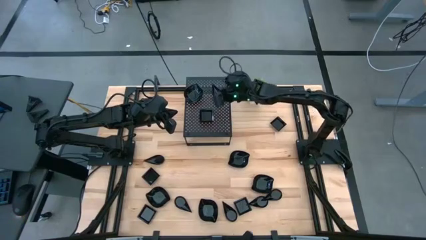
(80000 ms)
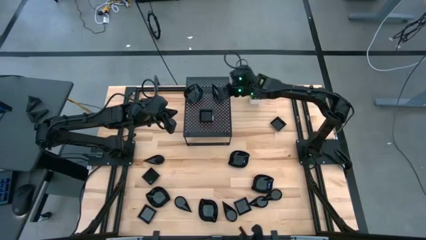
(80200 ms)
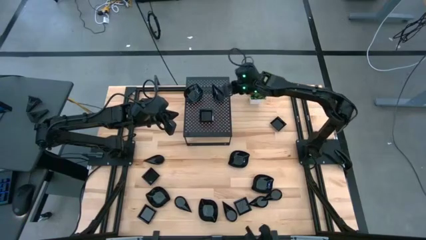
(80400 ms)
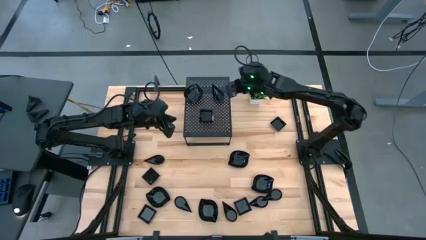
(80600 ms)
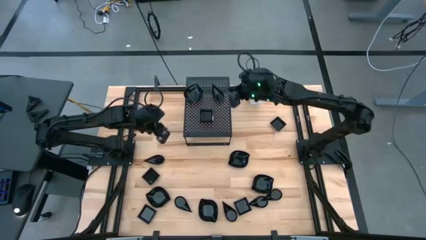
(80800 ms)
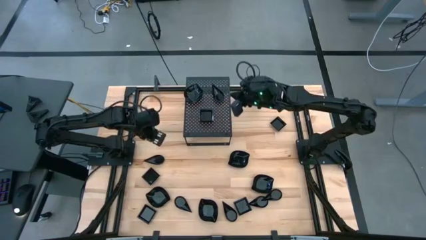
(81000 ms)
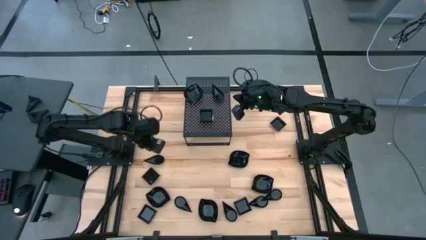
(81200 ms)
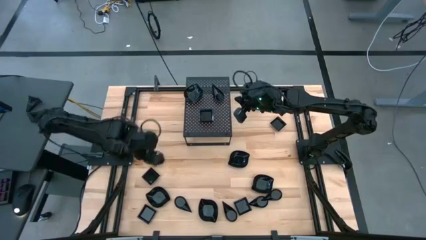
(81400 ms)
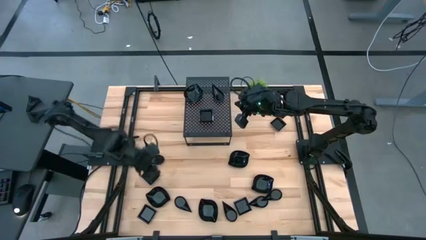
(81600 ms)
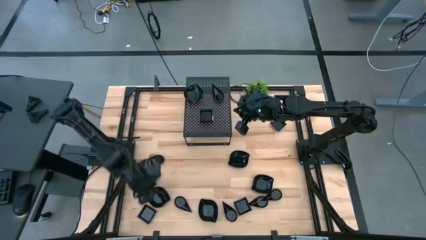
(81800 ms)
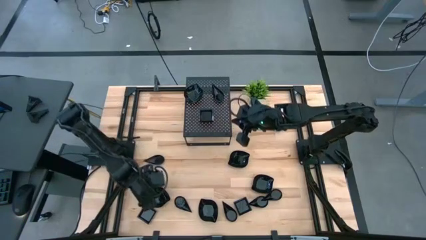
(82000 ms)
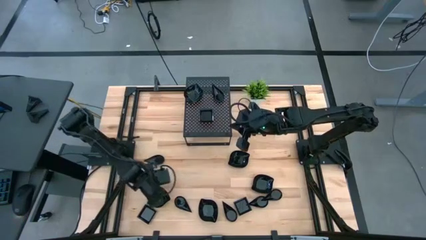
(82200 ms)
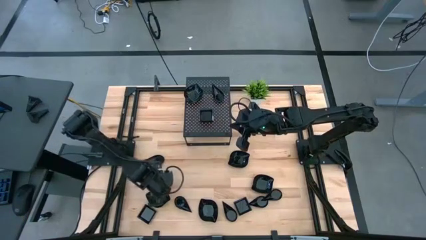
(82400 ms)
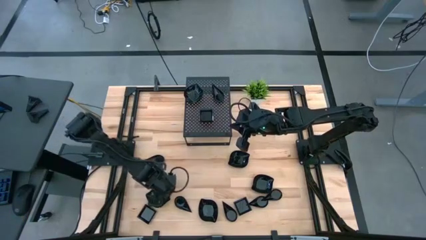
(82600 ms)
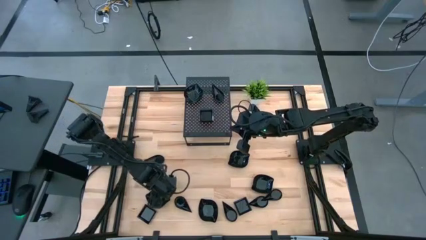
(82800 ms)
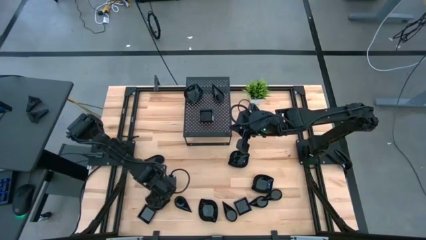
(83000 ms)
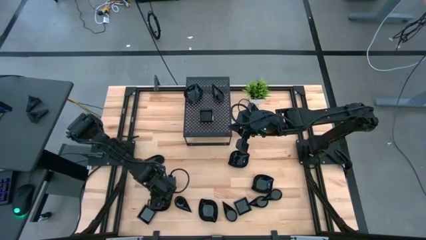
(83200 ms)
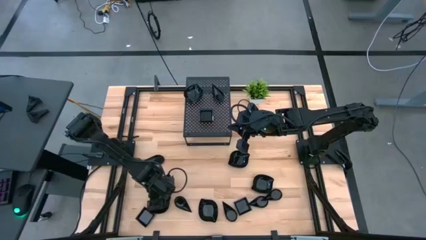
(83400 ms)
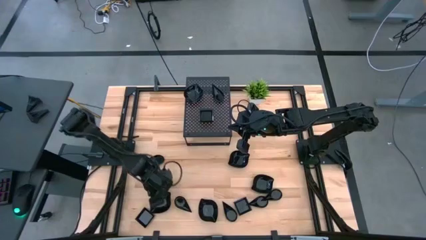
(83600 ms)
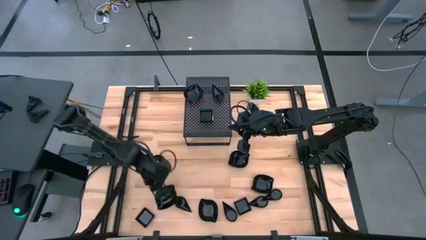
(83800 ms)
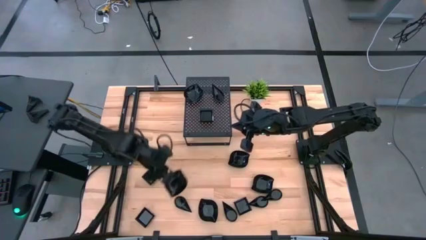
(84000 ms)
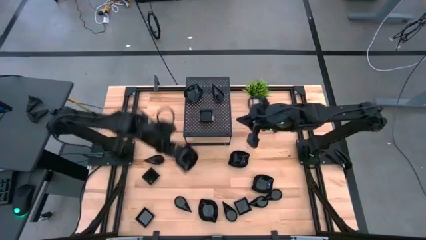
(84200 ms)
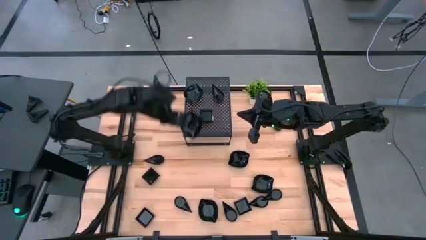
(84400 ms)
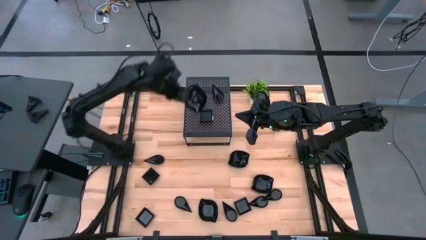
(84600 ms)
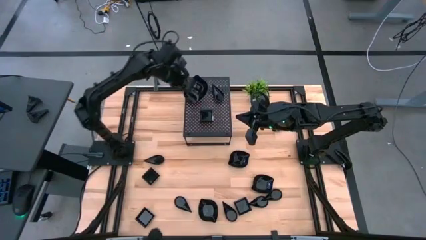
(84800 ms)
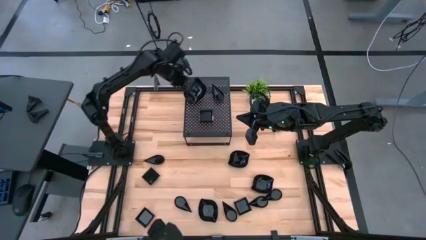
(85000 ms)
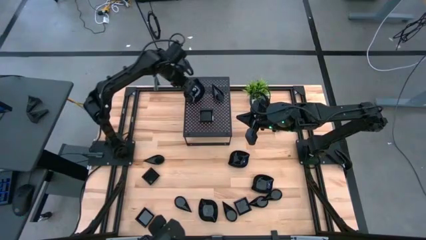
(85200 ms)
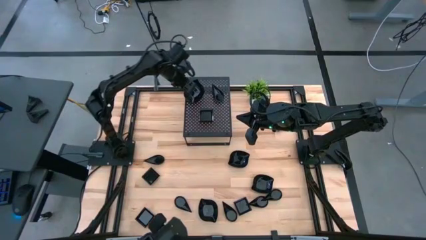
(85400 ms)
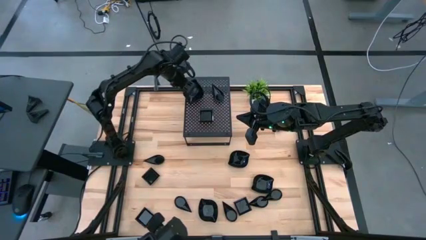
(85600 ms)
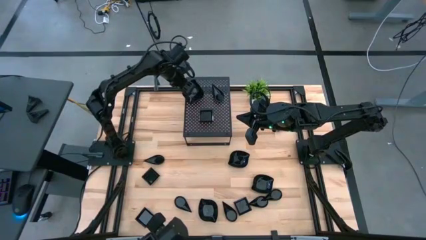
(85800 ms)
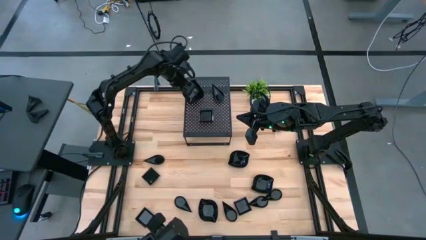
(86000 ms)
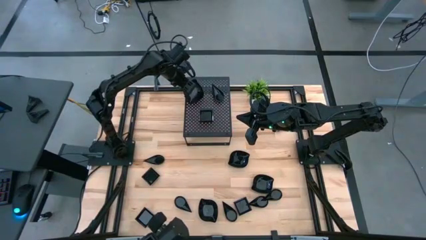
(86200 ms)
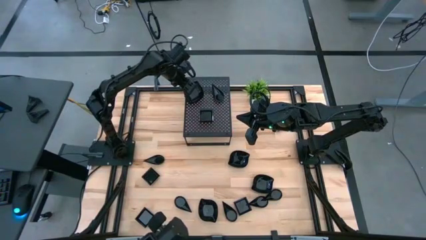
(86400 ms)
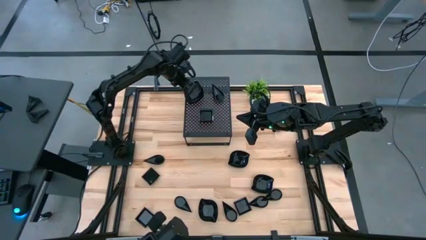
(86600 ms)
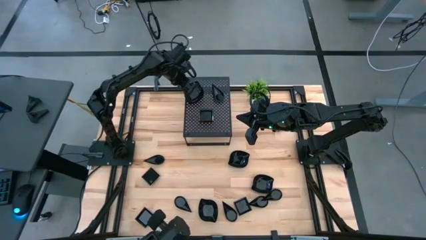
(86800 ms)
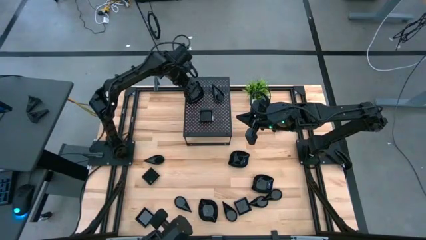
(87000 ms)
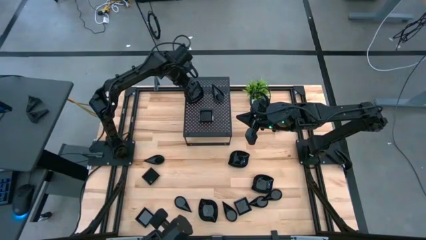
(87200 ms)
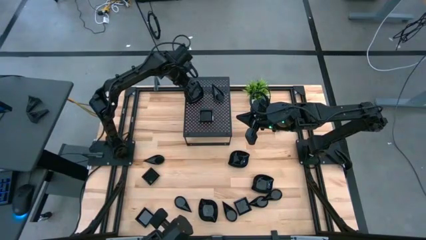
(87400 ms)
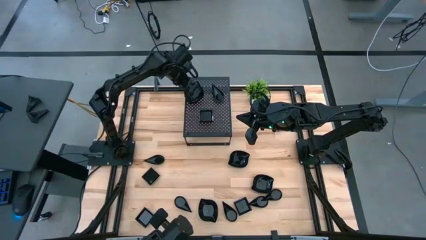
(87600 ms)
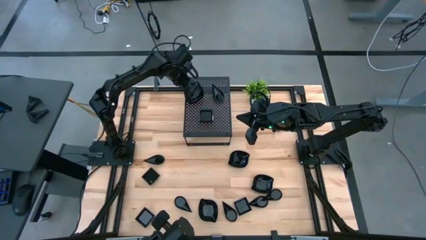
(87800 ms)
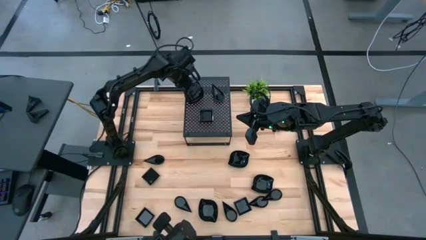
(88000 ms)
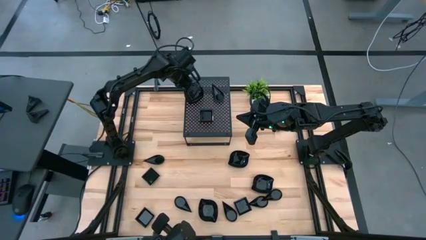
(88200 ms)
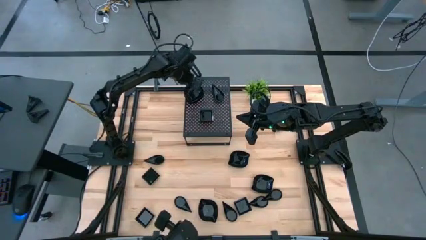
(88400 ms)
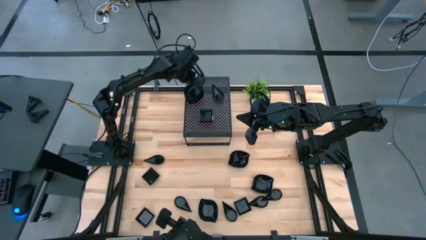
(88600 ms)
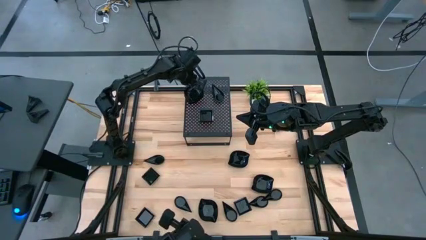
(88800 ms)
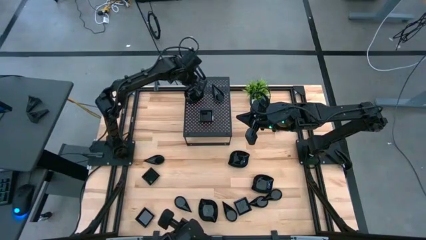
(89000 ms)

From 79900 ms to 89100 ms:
Task: Pick & Place Mini shaped plates
Stack the leaf shaped plate on top of the leaf shaped plate on the shelf

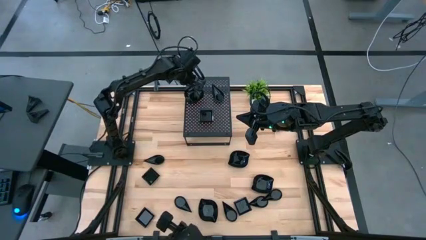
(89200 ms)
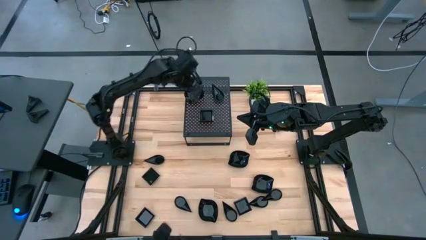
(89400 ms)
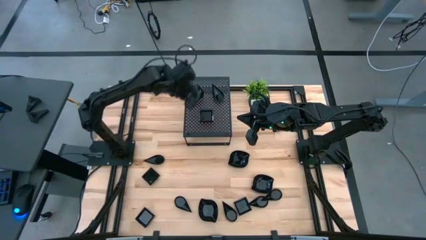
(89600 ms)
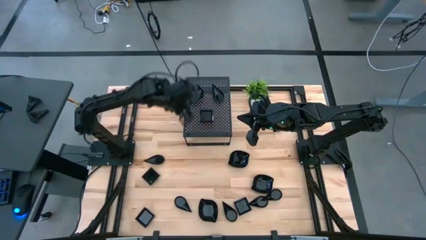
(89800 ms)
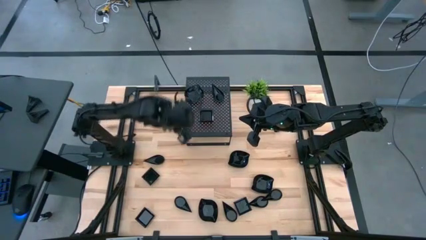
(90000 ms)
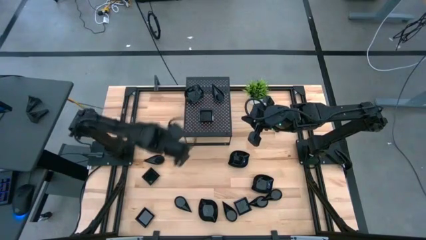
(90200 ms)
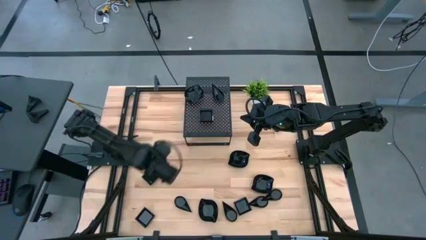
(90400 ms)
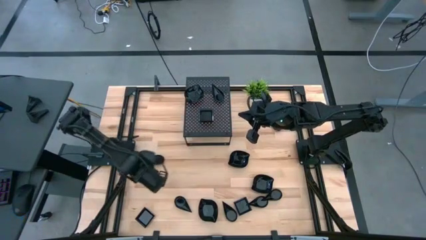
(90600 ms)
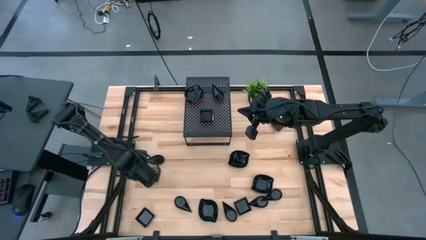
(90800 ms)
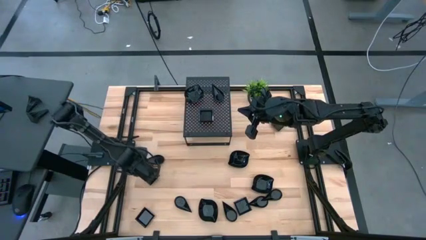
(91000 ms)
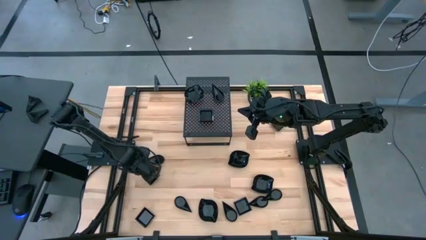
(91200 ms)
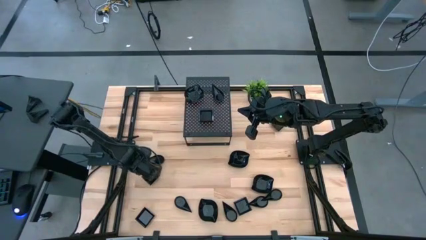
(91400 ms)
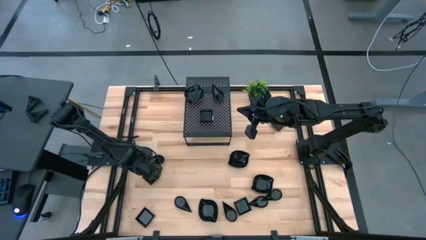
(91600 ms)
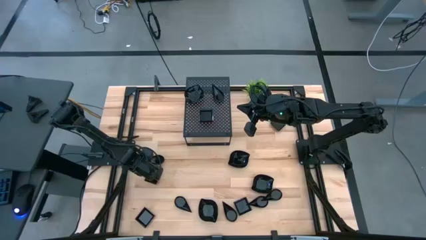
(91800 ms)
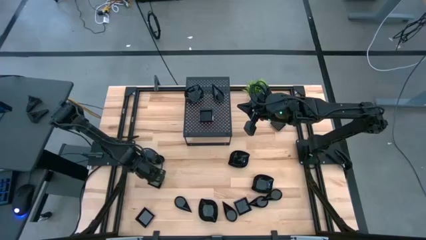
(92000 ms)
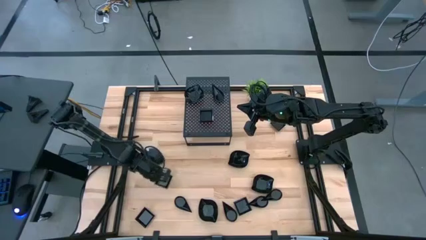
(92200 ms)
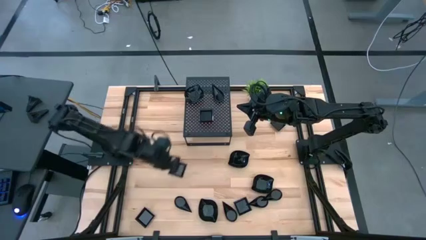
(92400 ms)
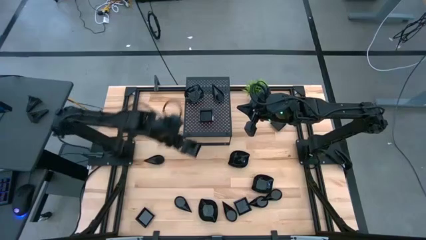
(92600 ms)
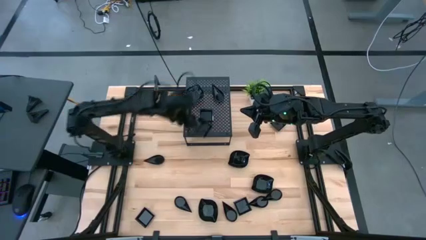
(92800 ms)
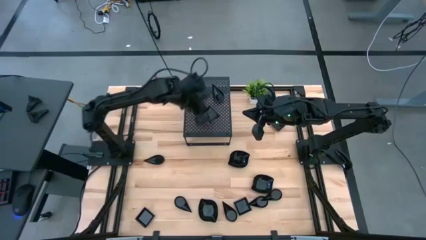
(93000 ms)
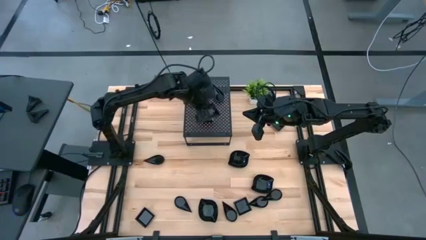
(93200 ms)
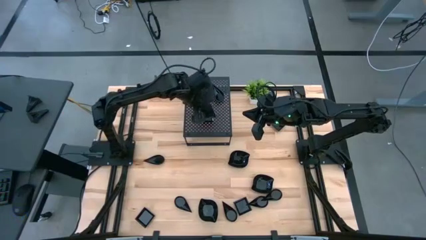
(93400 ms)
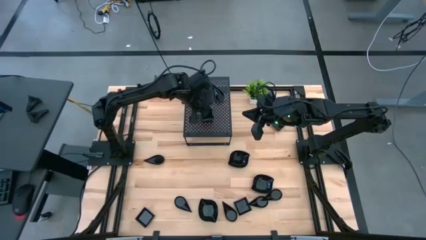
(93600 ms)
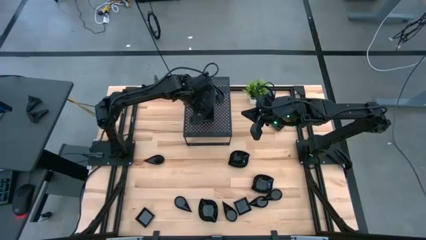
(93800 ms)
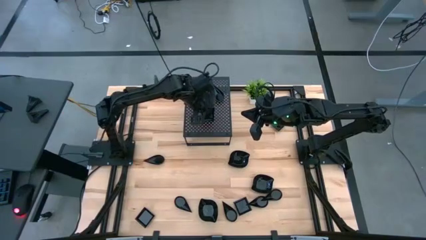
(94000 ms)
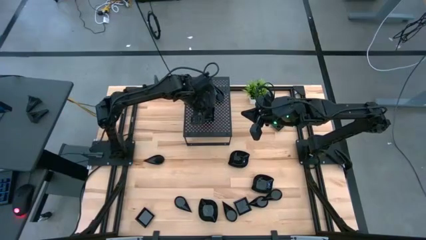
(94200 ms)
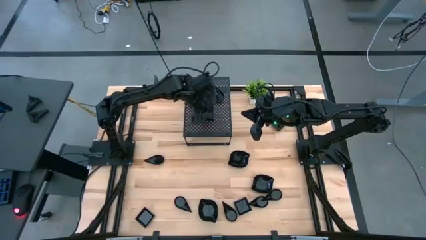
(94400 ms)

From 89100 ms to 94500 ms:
Stack the square plate on top of the square plates on the shelf

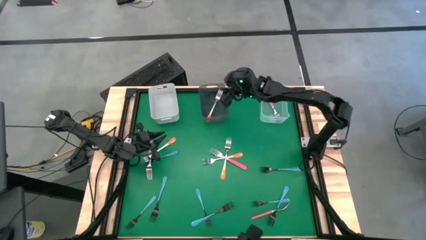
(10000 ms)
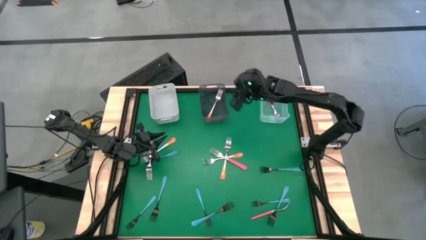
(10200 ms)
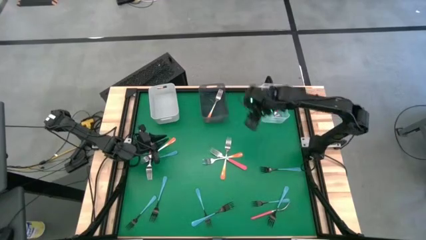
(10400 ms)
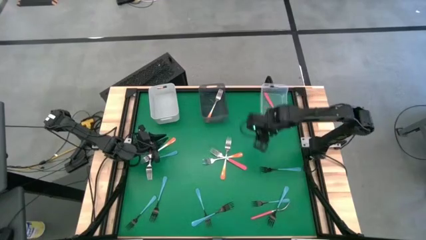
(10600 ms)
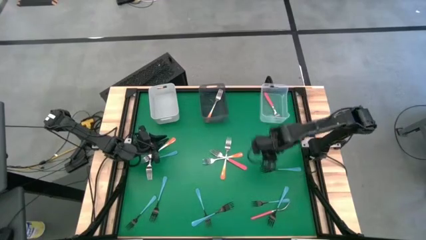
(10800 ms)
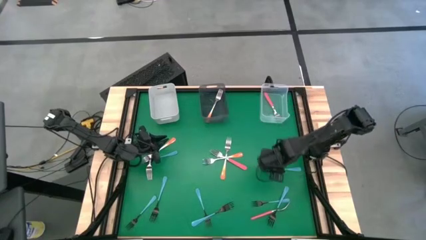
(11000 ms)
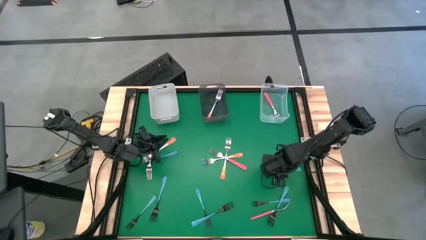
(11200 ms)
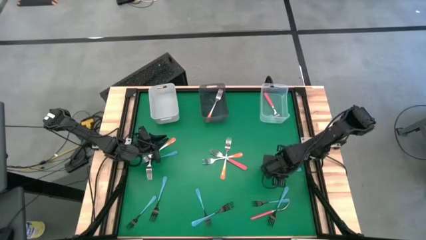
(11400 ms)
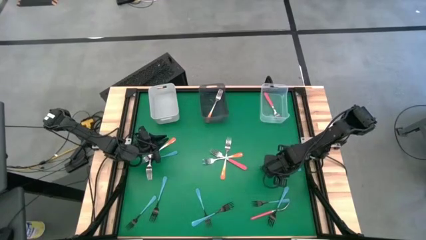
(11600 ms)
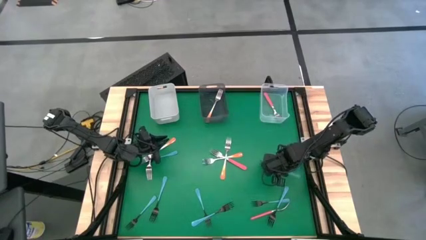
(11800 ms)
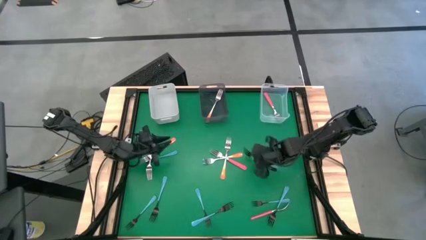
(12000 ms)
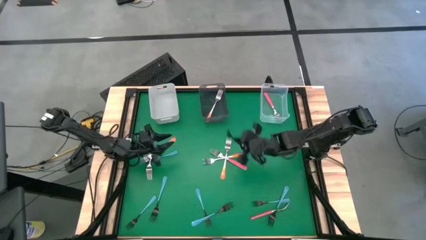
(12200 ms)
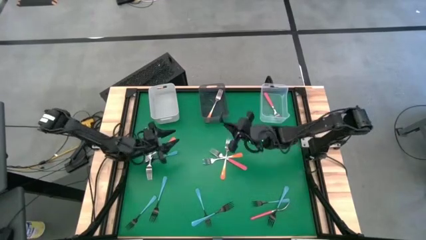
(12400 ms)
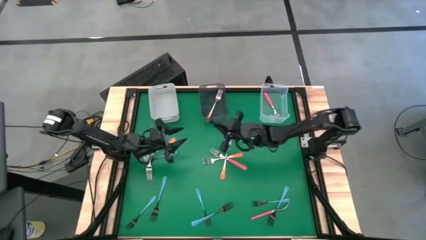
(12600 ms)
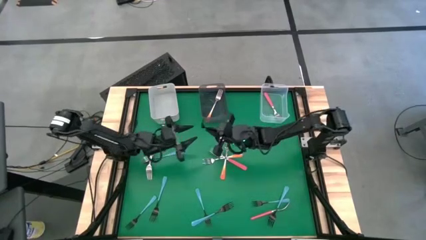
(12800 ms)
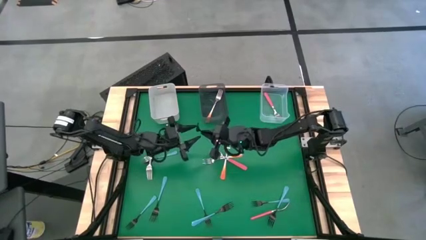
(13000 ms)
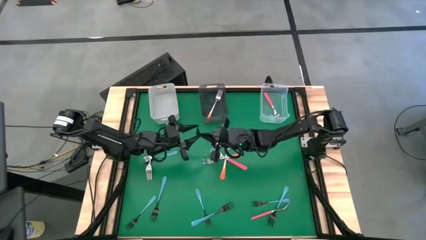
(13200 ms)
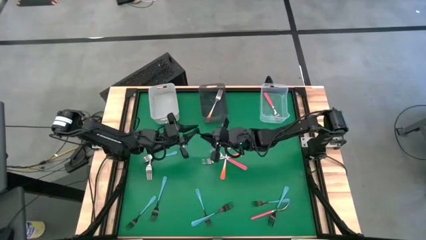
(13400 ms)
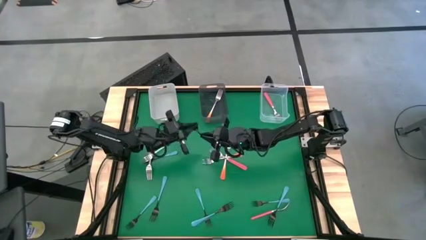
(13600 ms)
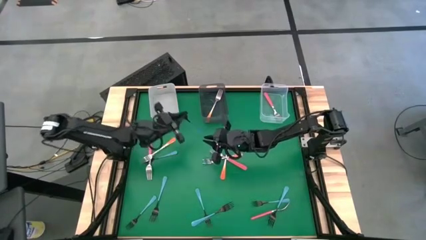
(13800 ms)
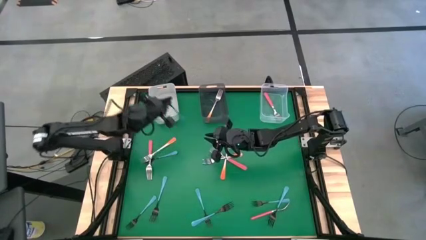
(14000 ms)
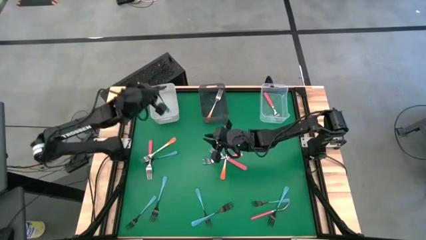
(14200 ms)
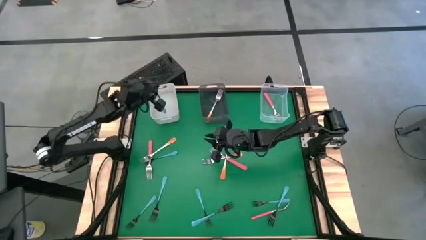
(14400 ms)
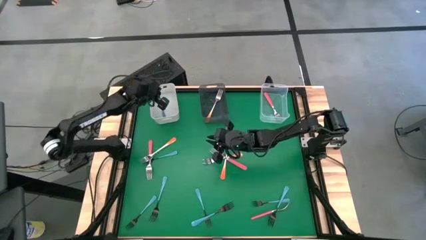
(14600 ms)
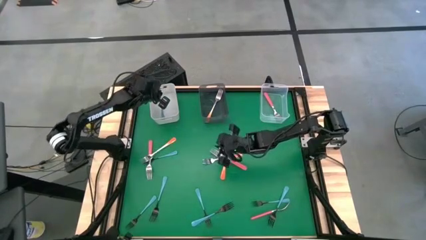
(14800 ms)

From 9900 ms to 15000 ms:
Task: Sort silverware by color (type)
Put the blue fork into the white bin
